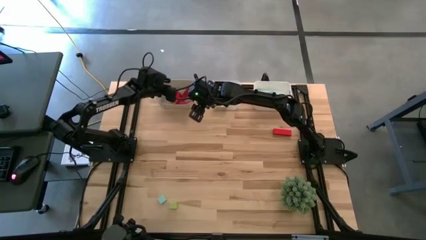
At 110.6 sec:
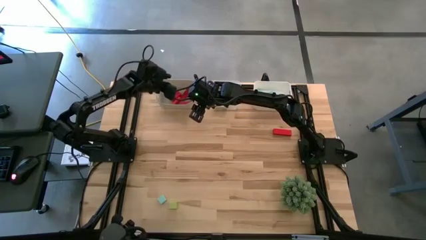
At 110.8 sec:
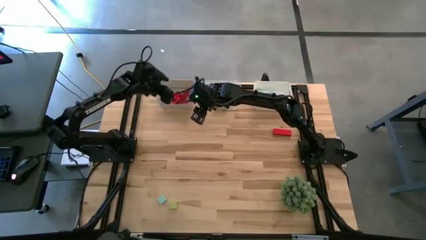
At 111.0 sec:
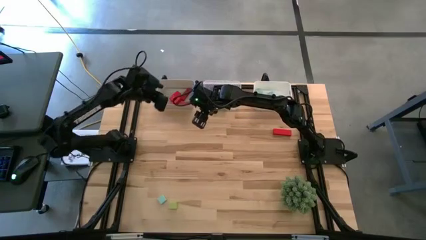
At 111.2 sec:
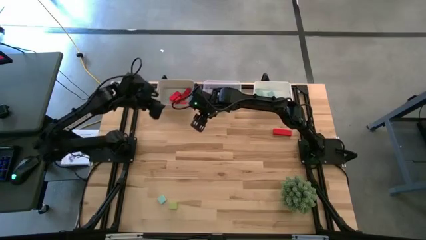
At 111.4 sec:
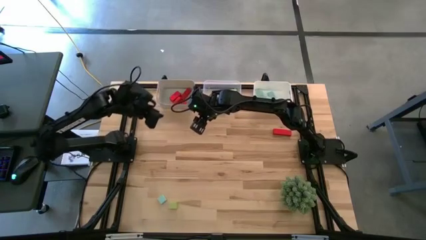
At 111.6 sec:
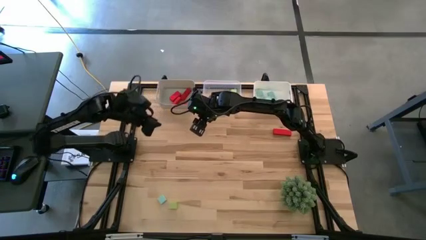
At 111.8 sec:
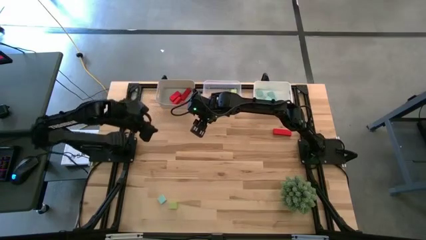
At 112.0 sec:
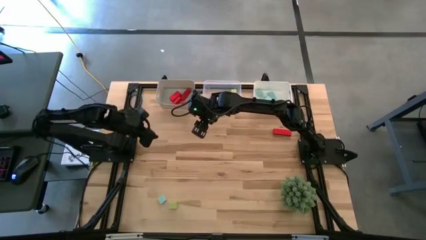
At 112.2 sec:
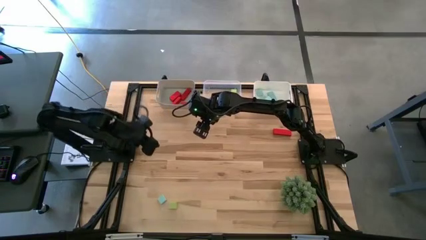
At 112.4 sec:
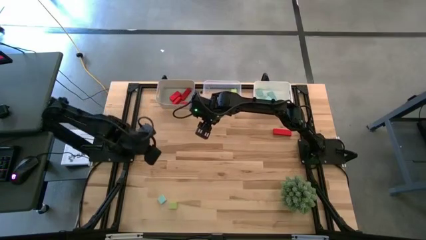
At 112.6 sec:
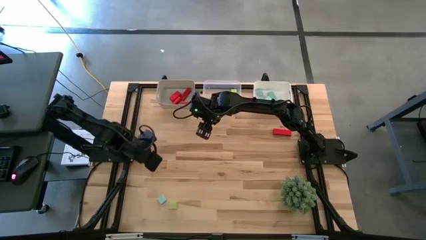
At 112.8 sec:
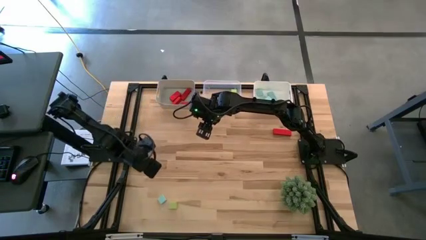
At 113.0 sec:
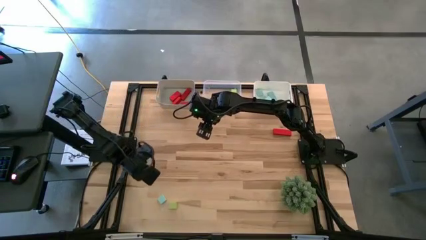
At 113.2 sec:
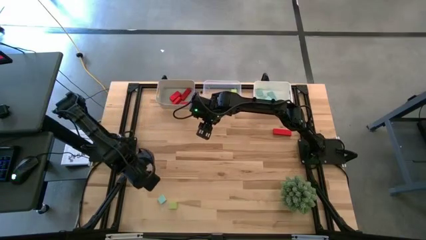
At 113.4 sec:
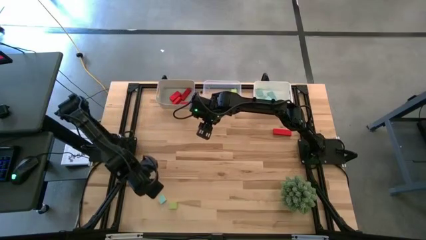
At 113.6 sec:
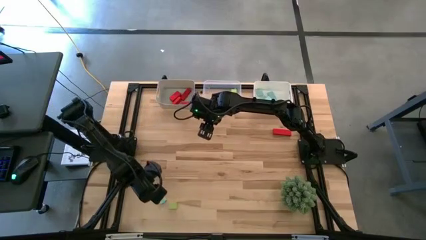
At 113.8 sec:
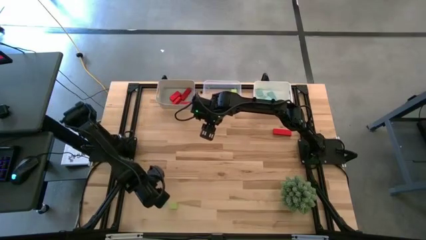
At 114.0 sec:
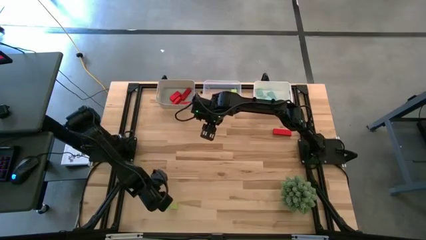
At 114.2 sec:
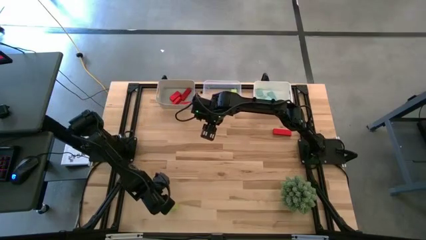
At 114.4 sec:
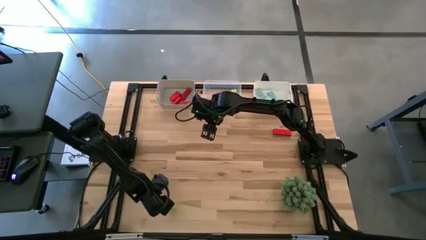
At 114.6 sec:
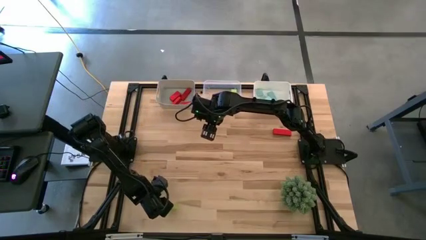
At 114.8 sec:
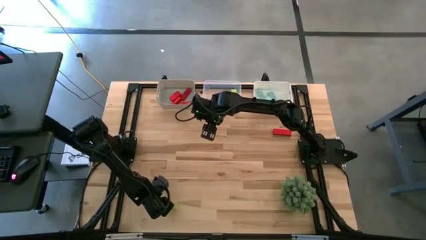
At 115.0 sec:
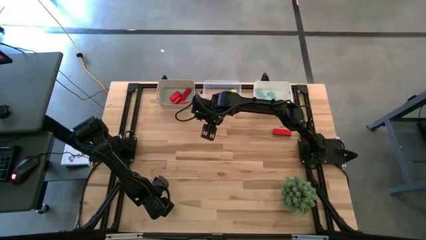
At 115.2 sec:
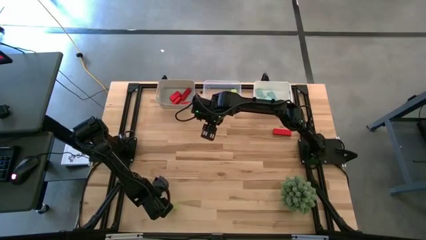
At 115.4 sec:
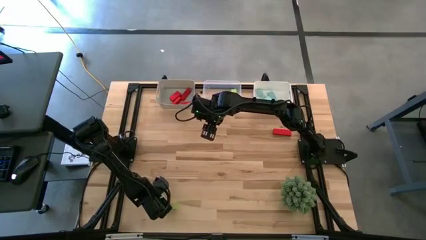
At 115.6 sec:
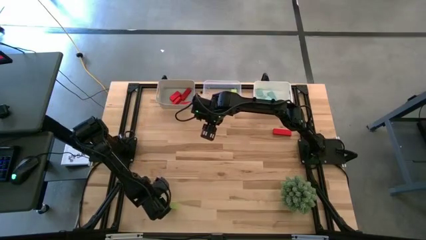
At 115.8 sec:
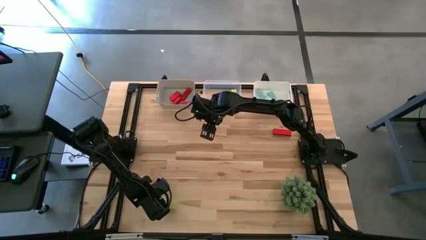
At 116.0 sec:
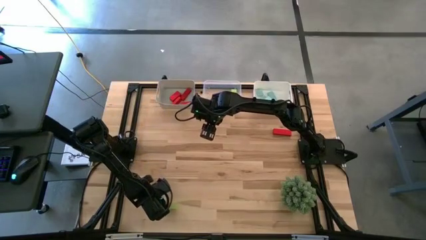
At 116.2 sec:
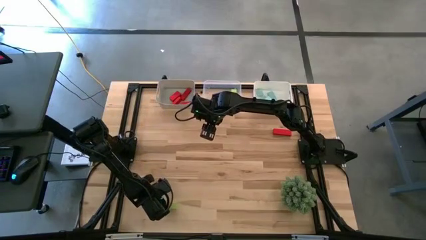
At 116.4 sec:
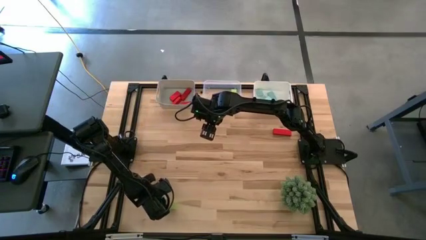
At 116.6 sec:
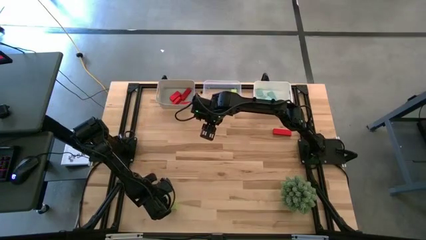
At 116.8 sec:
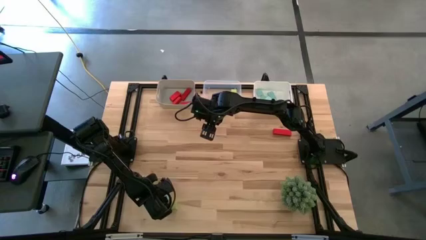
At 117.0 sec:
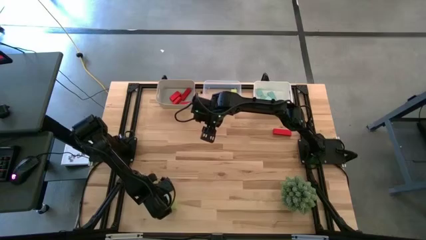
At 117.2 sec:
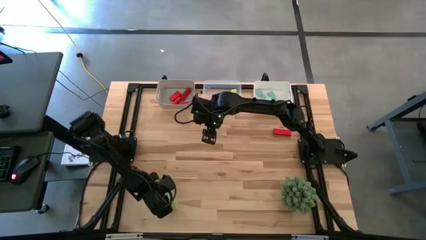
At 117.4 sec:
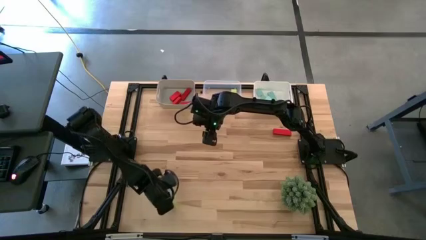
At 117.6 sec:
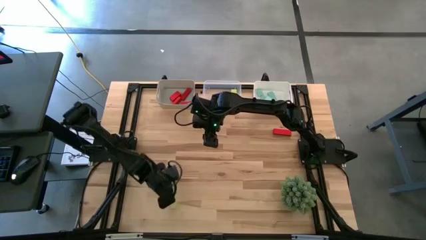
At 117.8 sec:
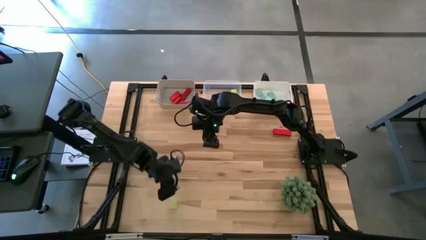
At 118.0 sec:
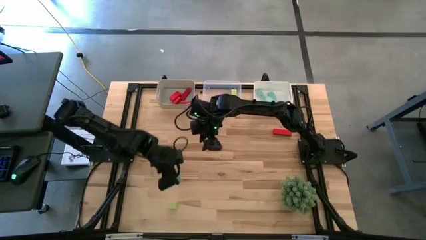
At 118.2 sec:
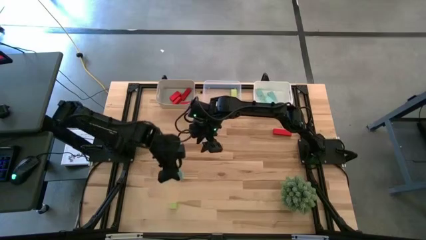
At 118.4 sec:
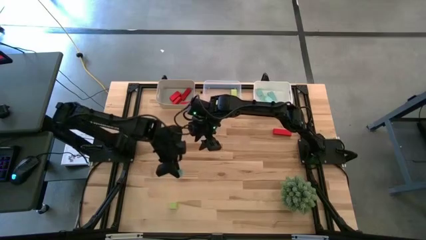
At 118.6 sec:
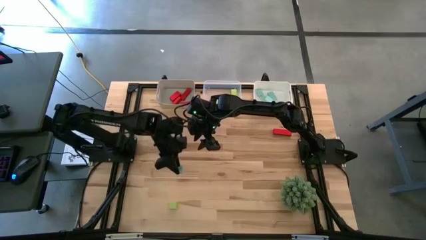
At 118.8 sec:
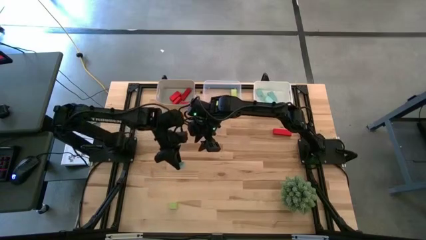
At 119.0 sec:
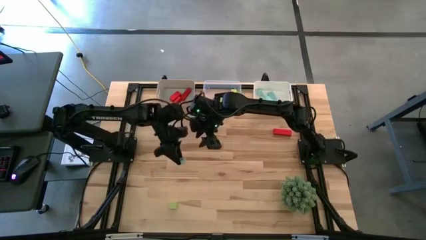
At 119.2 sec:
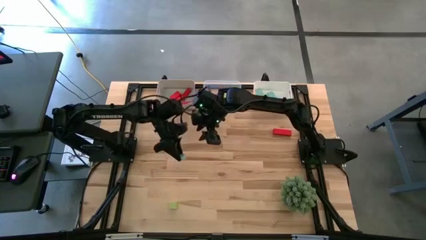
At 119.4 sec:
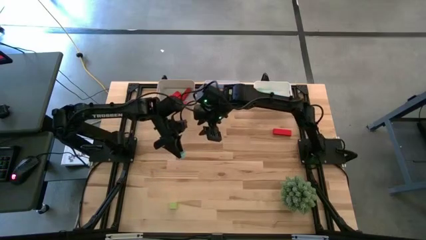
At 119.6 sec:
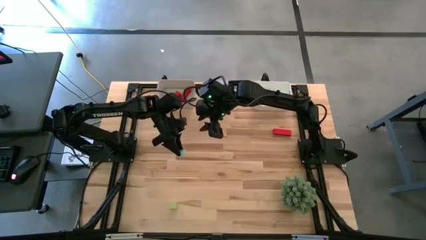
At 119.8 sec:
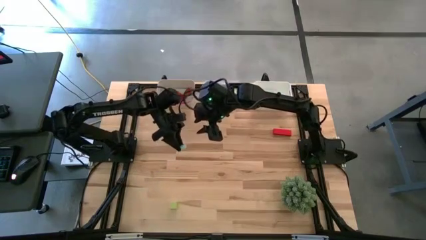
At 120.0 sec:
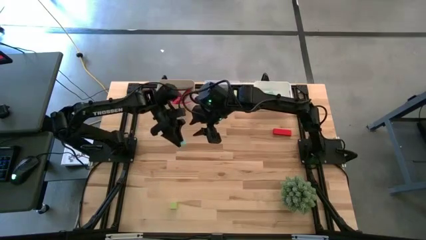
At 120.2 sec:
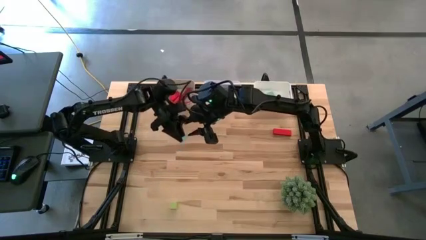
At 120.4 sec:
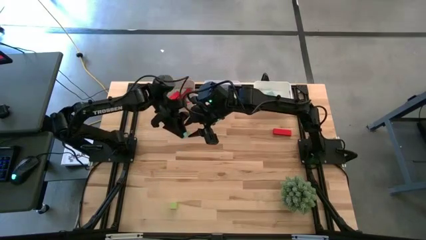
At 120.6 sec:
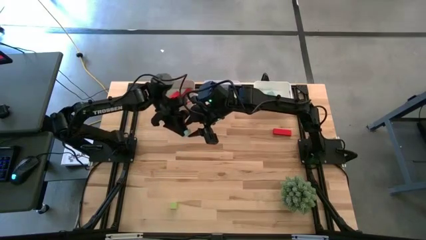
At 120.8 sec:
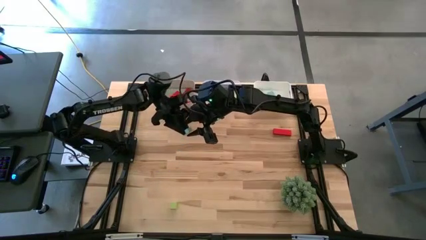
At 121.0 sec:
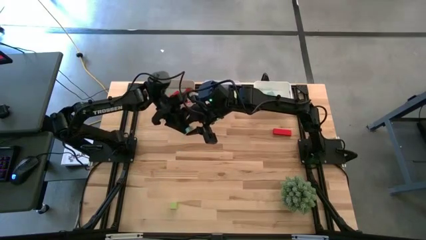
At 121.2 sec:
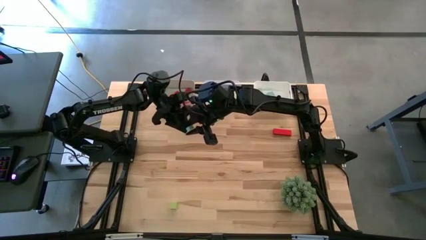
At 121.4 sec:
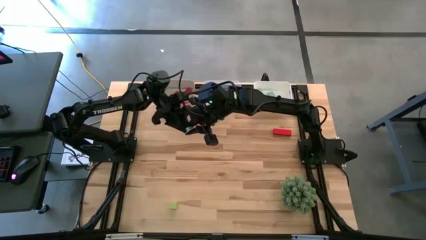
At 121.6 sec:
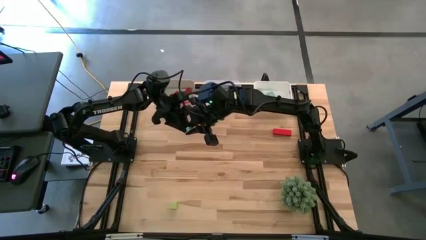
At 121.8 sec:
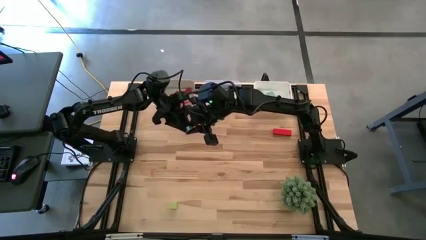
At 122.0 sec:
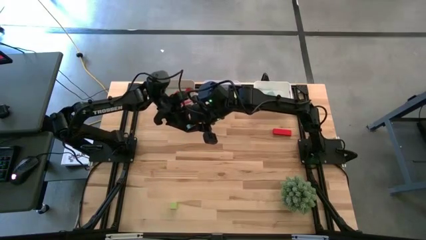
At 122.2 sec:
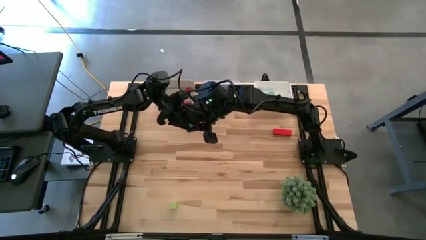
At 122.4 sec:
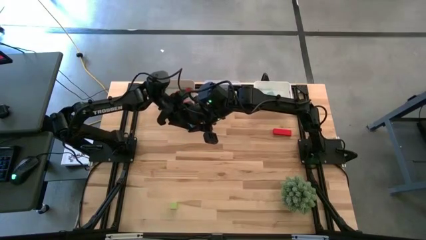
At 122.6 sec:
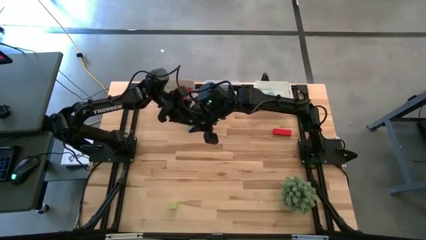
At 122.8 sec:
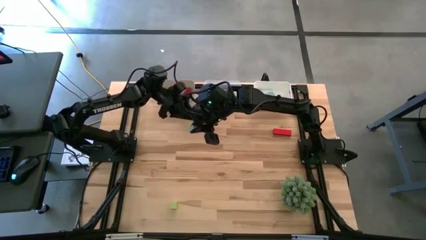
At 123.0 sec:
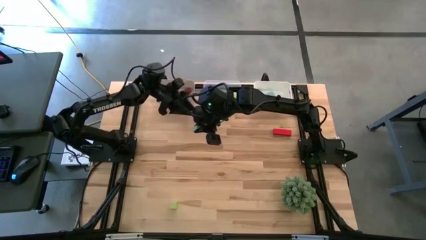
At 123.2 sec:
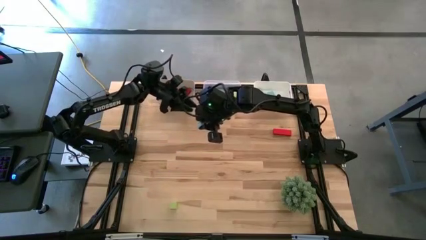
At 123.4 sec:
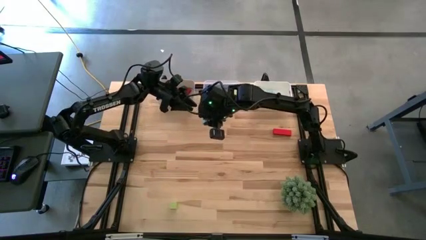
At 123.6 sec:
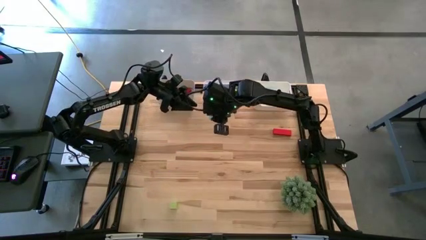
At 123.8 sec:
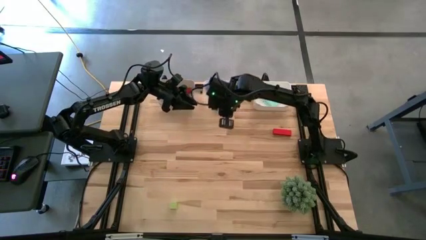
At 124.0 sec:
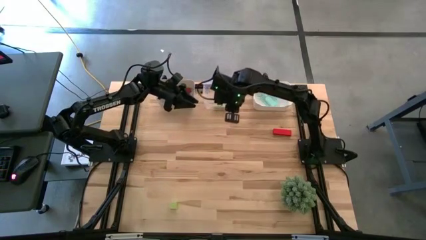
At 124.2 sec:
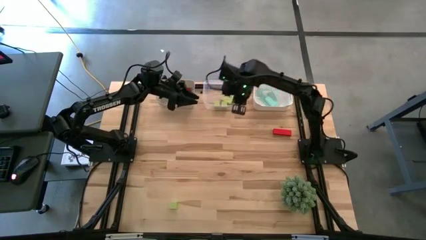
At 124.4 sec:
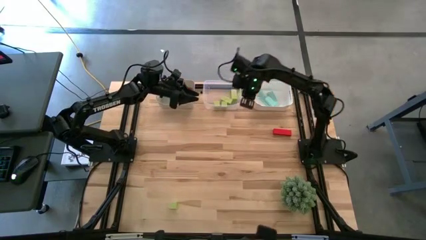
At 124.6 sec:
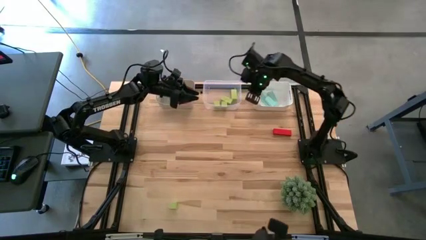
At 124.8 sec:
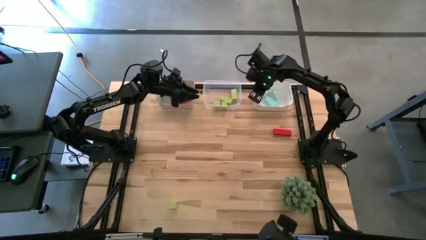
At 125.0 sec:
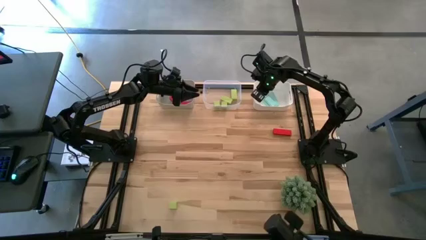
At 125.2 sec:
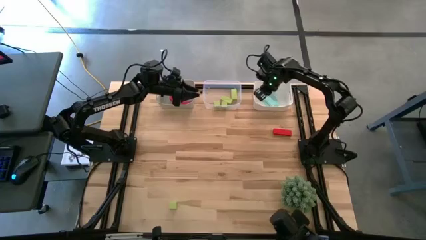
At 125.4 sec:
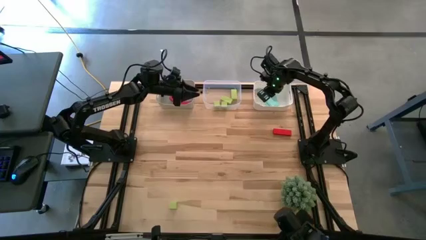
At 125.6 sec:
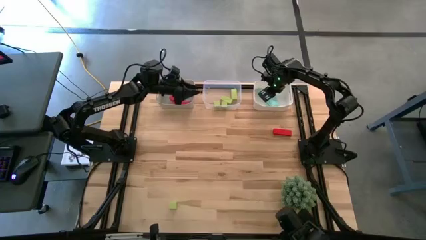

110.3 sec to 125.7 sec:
Task: Sort & place blocks by color
Put the blue block into the white bin

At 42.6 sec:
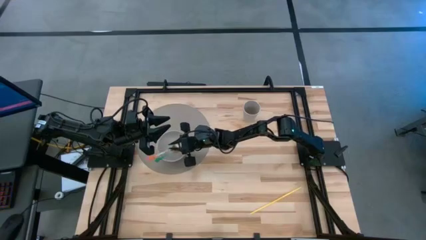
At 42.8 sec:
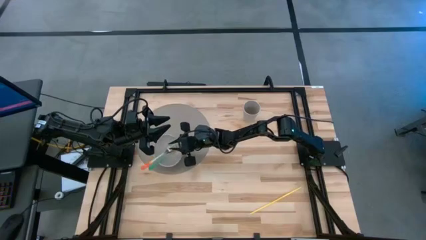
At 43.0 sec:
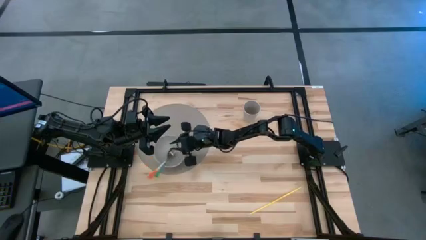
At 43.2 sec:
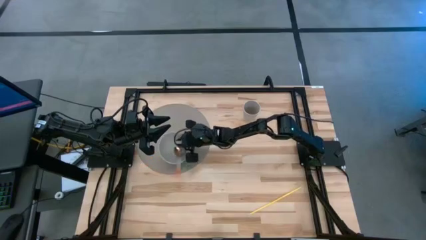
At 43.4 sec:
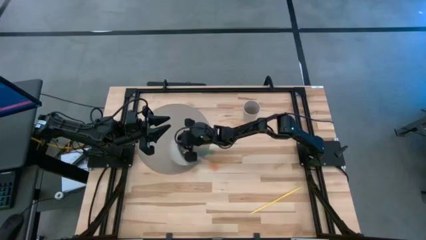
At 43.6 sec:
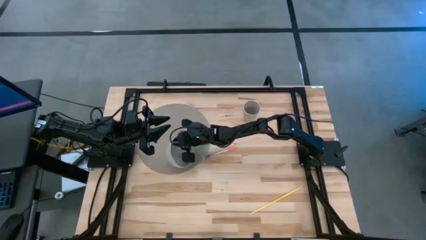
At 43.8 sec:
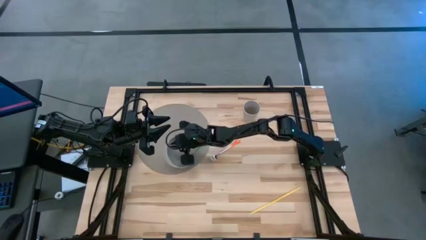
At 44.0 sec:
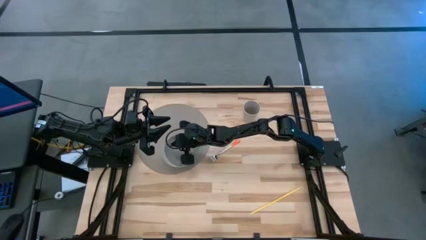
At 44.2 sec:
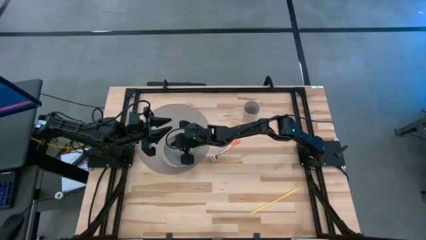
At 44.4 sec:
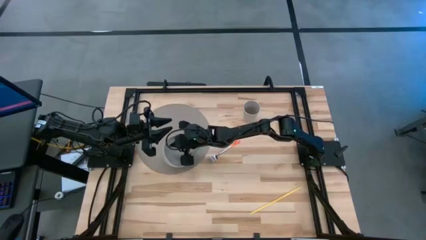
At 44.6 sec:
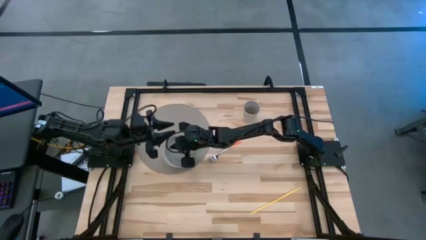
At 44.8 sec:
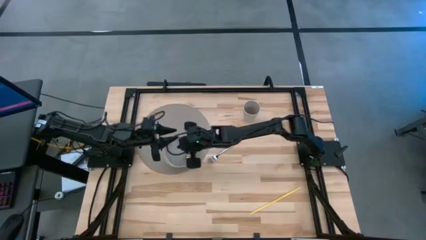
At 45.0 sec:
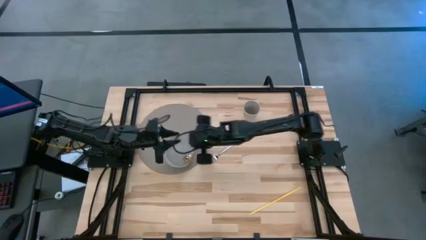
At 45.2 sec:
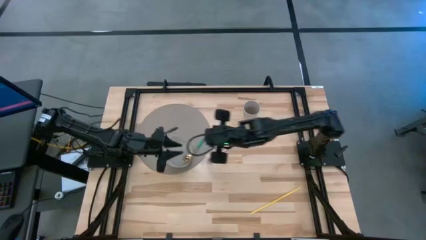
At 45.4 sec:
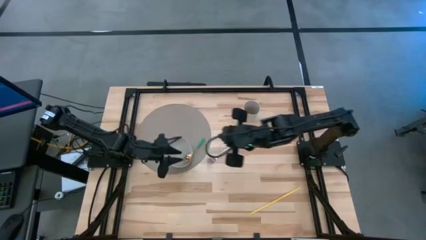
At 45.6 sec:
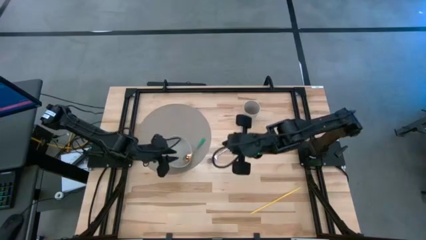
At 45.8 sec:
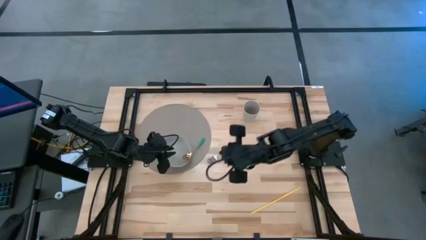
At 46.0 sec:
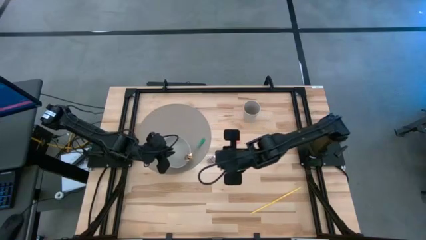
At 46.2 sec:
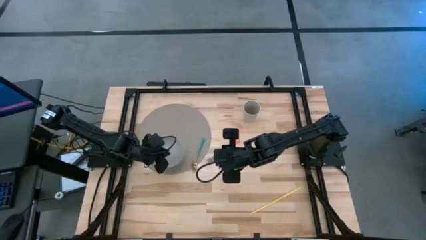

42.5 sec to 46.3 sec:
Task: Pick & Place Utensil
Adjust the white bowl on the gray placemat
